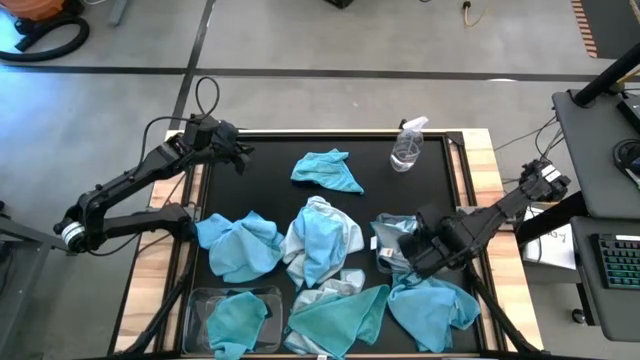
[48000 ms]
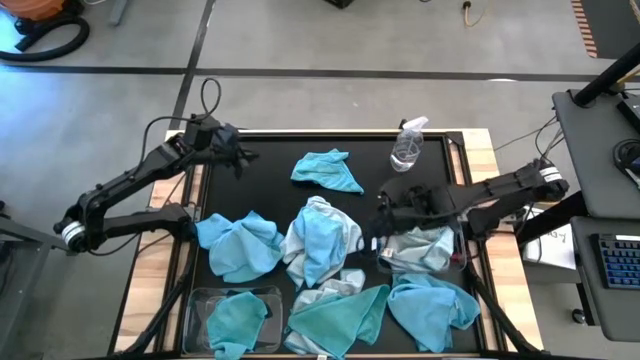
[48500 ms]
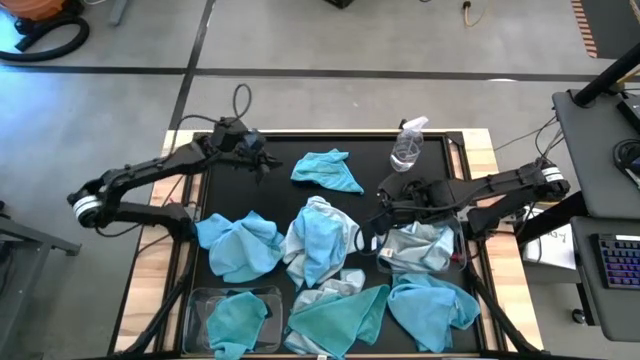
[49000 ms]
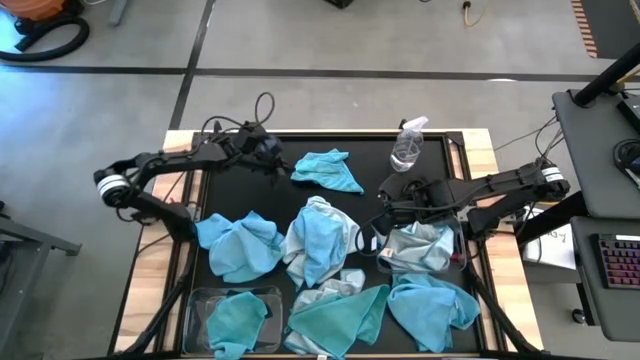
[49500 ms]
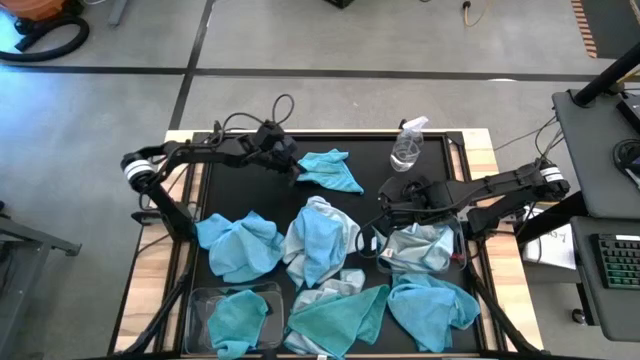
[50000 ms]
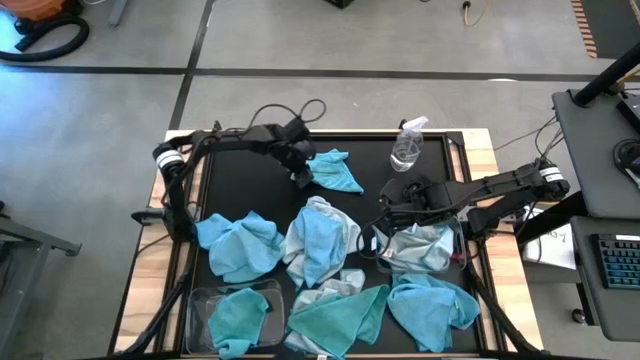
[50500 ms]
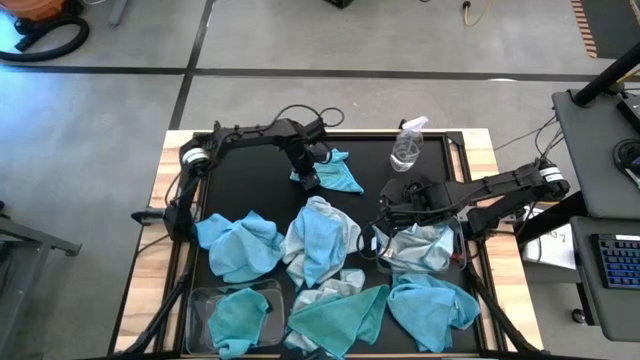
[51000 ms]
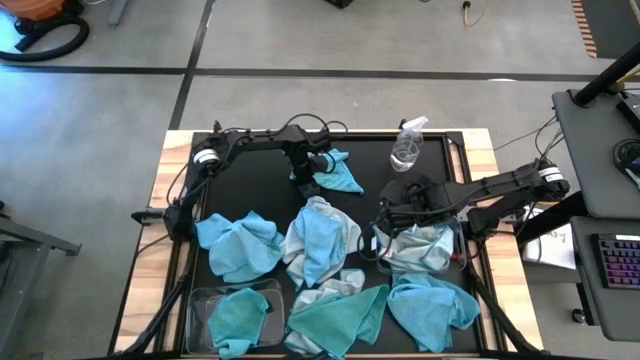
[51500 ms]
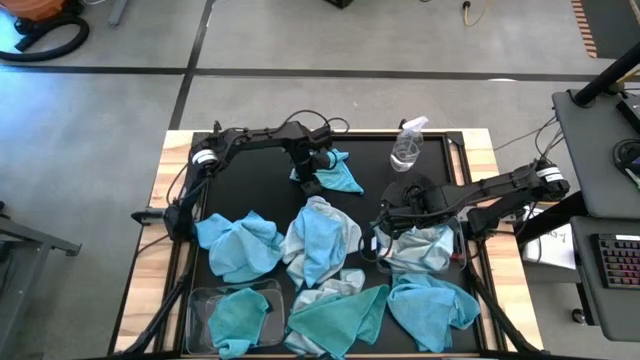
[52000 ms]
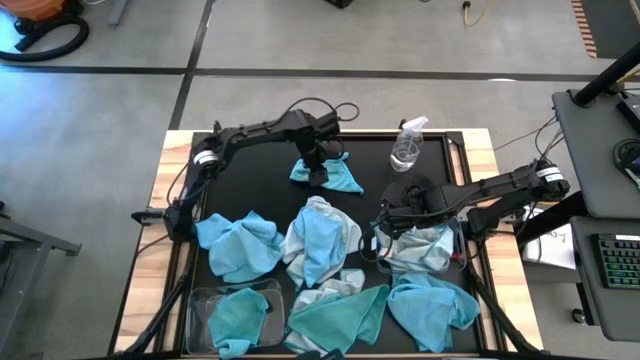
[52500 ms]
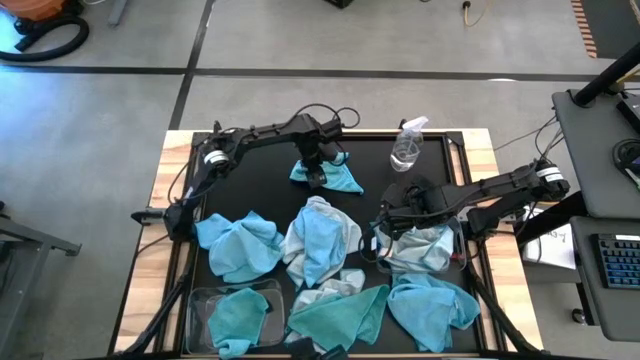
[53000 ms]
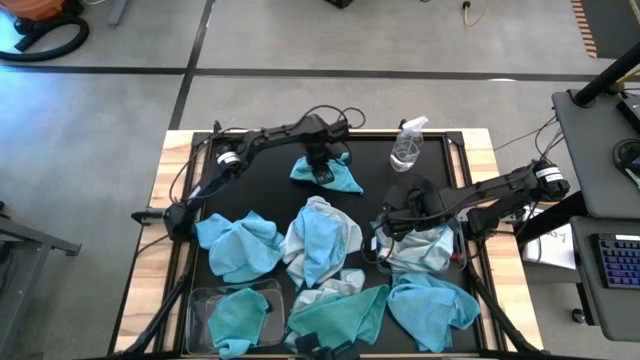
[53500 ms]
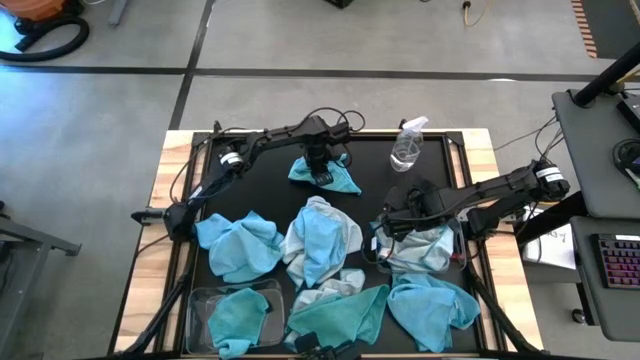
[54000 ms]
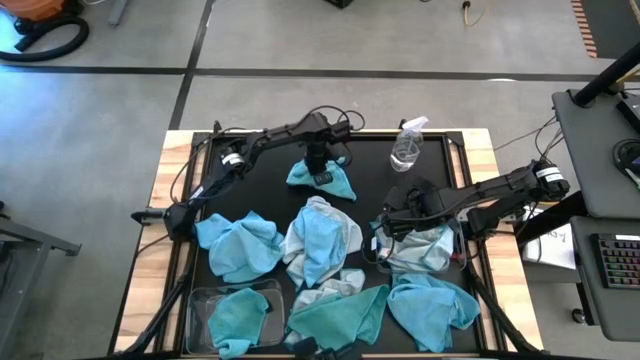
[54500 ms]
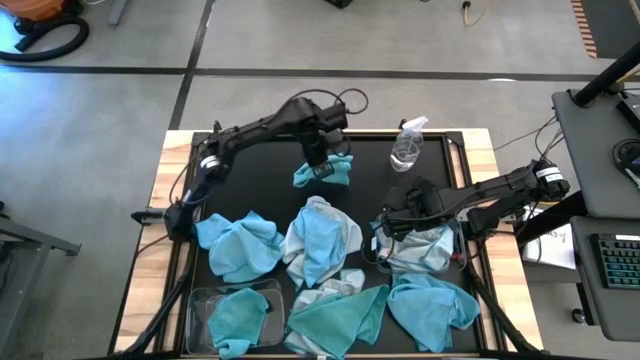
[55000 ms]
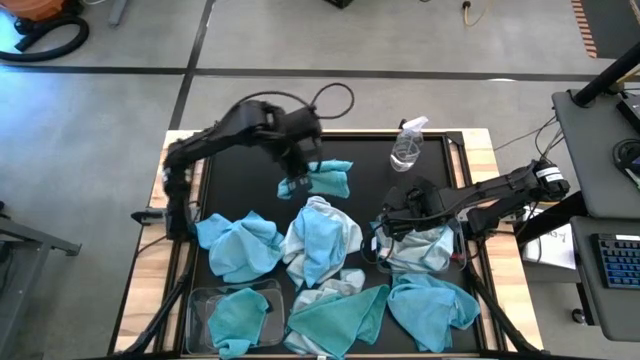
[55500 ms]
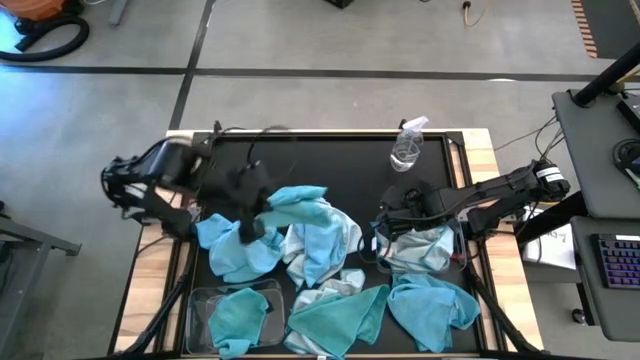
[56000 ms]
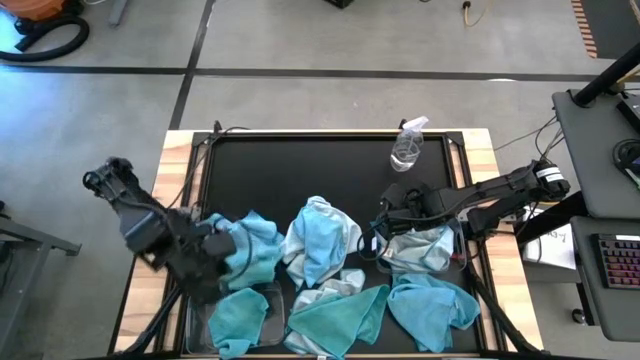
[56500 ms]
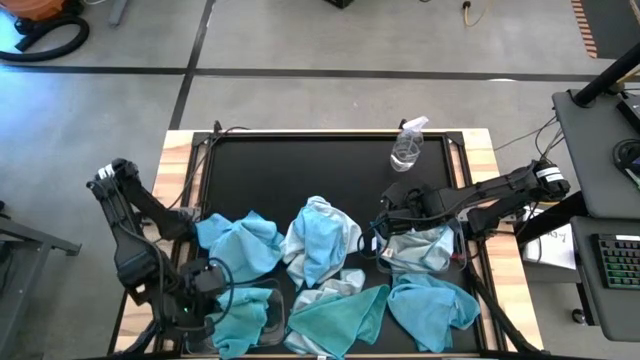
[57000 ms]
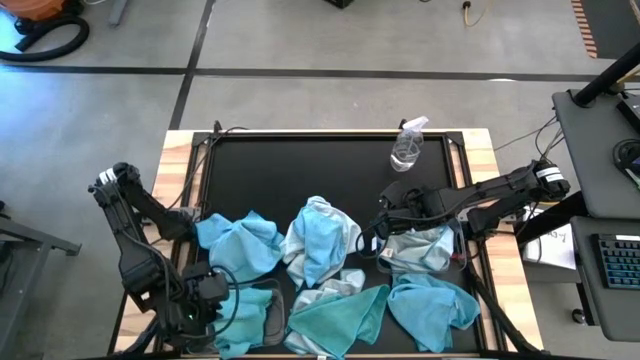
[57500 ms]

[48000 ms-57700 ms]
Task: Sort microfiber towel by color & place in baskets
Put the blue towel into the bottom transparent bin

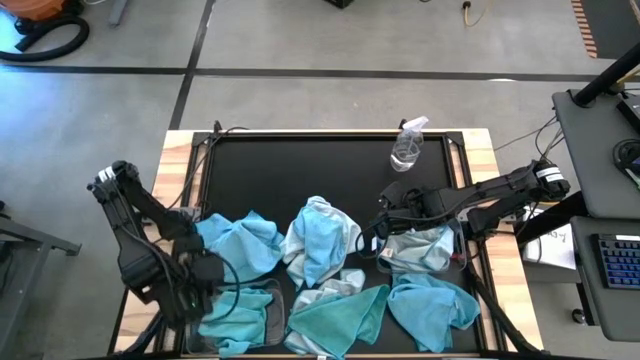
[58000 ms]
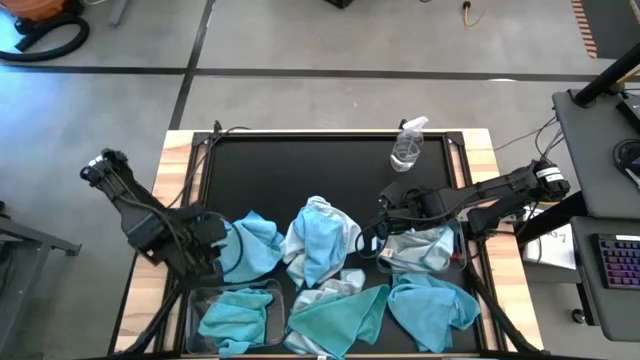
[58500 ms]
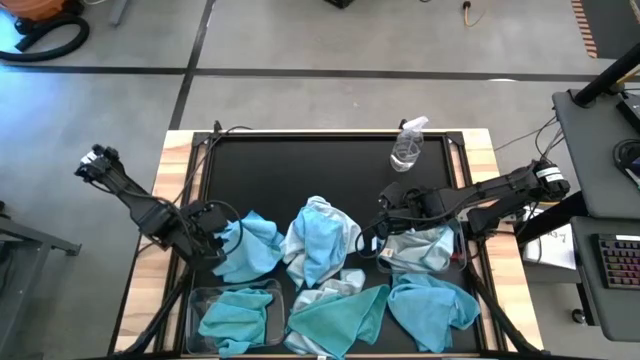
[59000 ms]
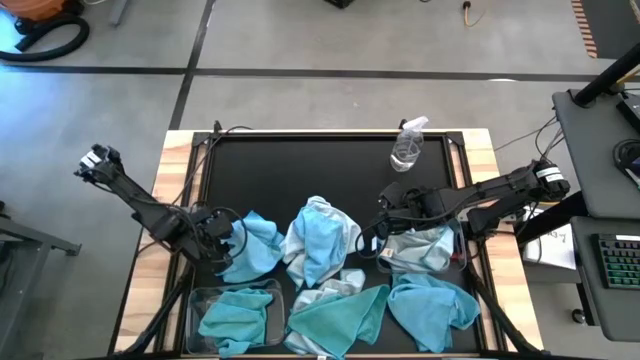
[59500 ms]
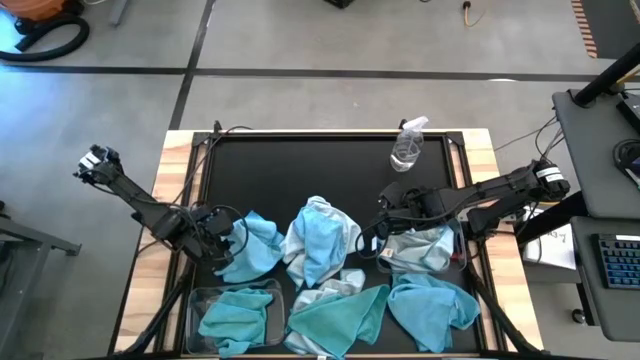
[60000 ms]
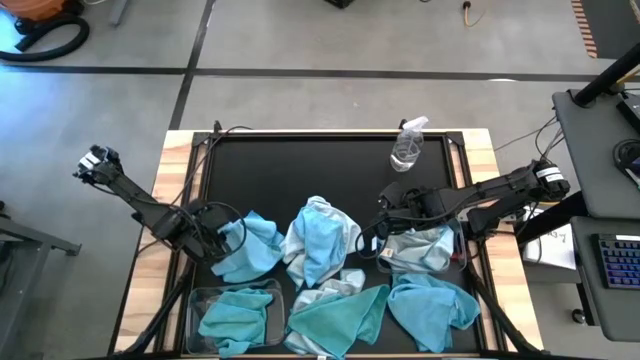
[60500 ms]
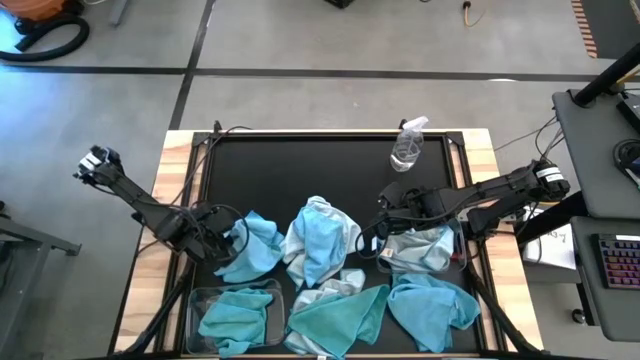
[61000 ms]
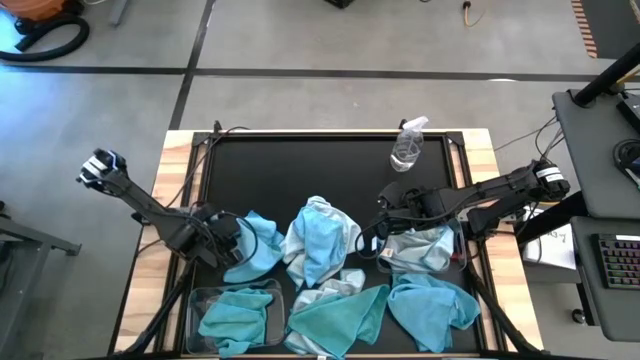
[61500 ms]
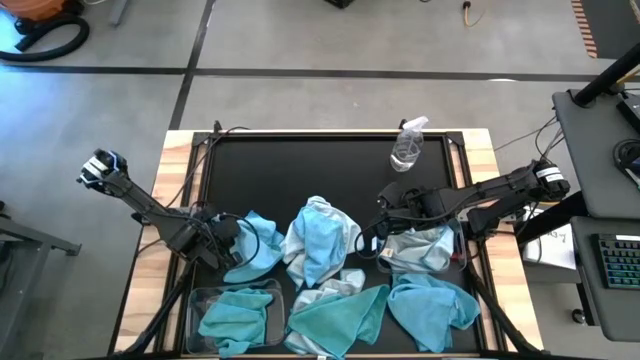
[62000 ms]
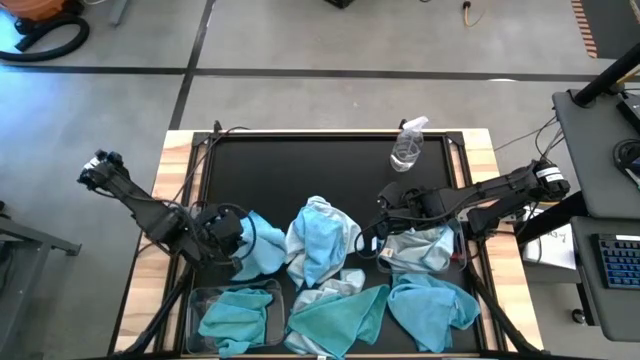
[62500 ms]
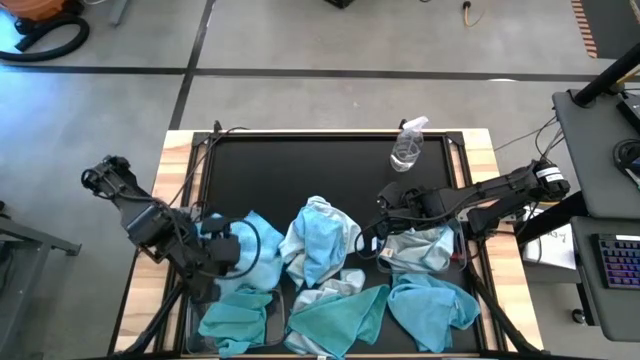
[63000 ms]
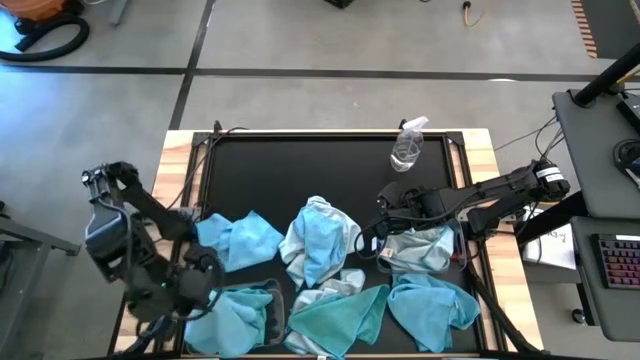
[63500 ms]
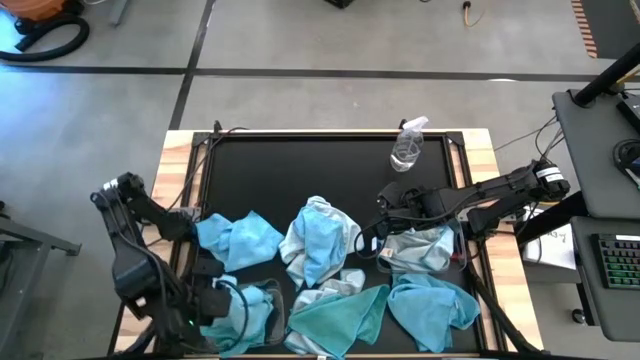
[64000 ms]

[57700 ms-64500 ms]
Put the blue towel into the bottom transparent bin

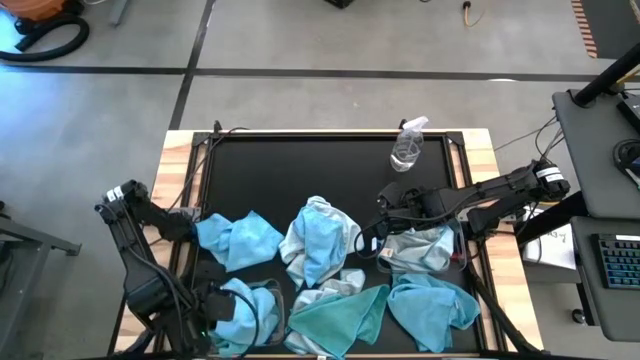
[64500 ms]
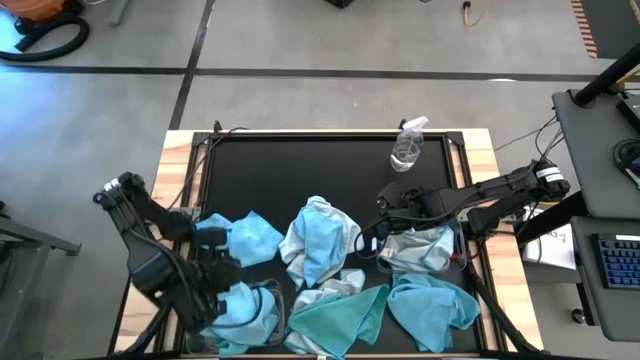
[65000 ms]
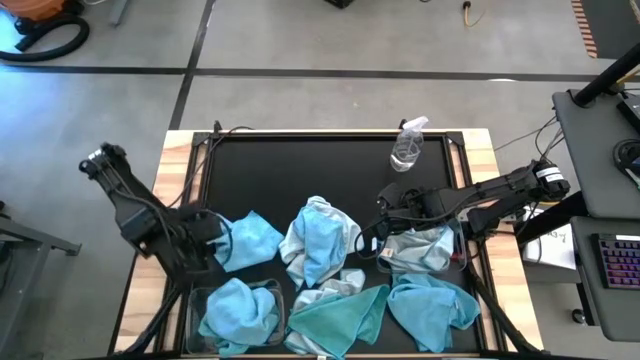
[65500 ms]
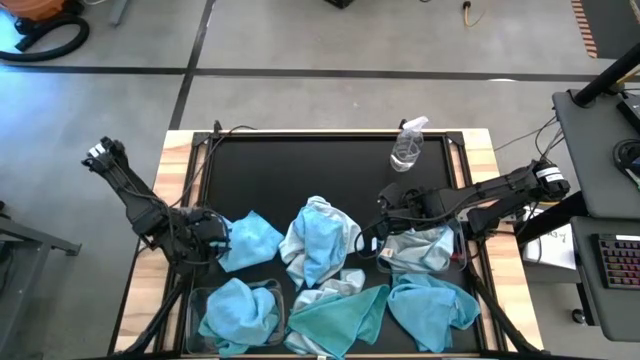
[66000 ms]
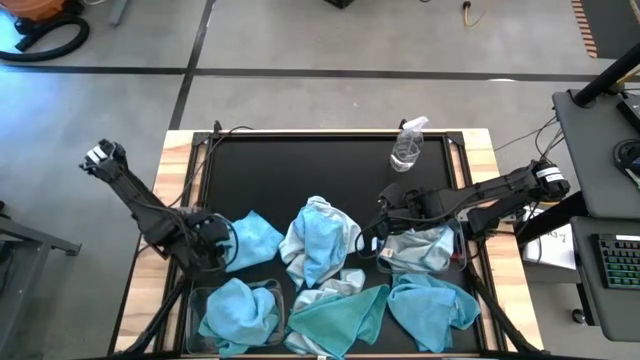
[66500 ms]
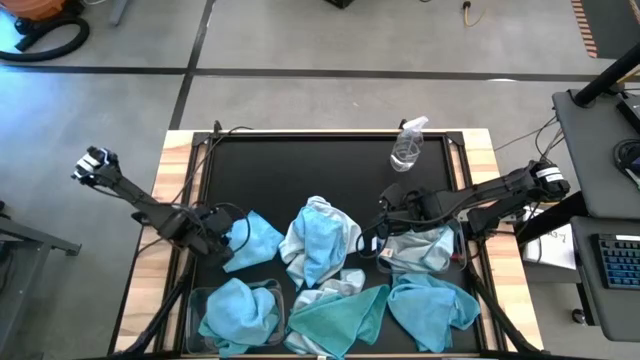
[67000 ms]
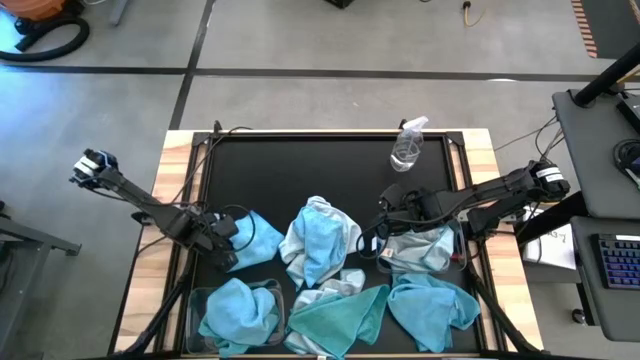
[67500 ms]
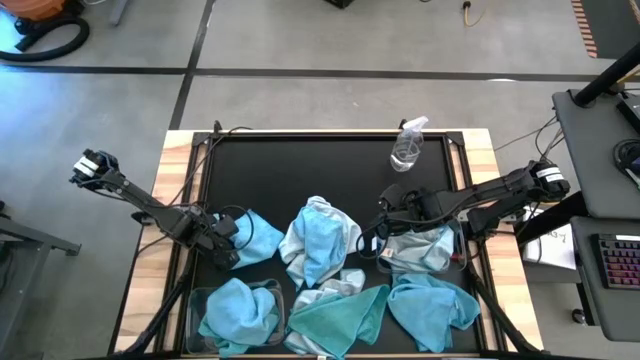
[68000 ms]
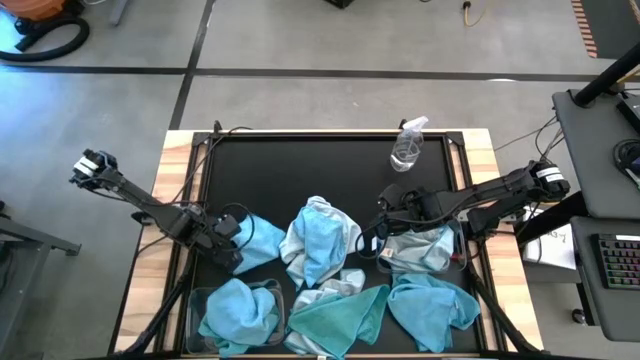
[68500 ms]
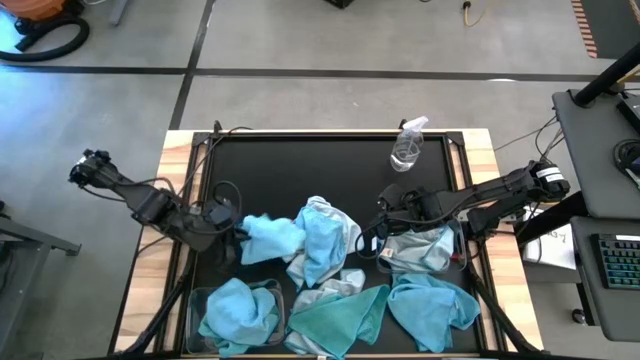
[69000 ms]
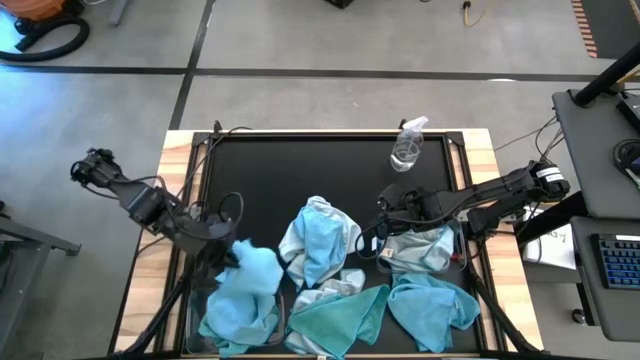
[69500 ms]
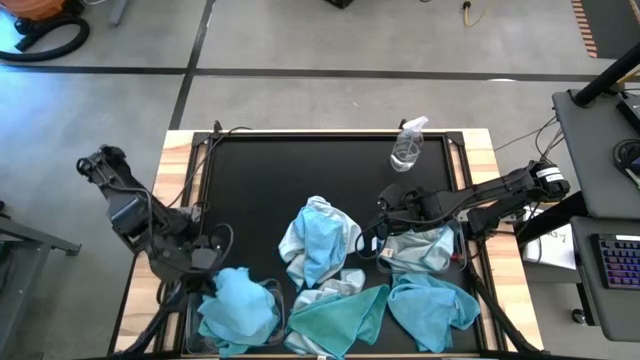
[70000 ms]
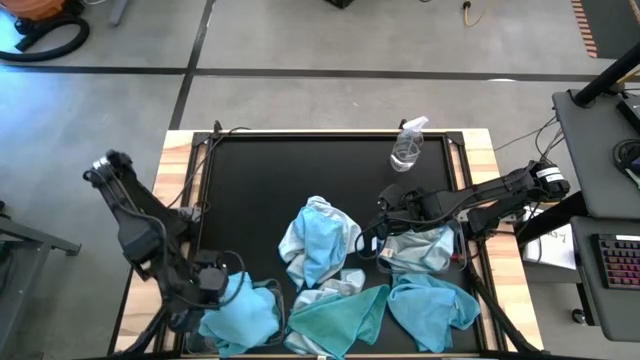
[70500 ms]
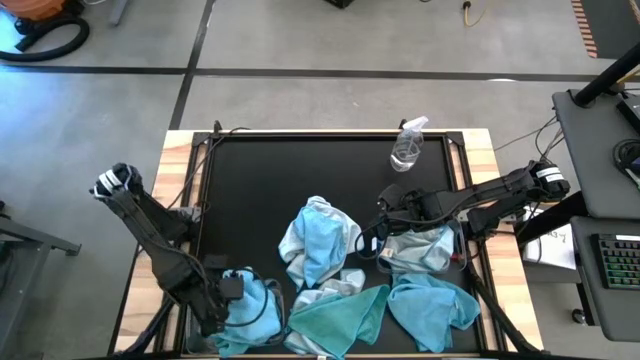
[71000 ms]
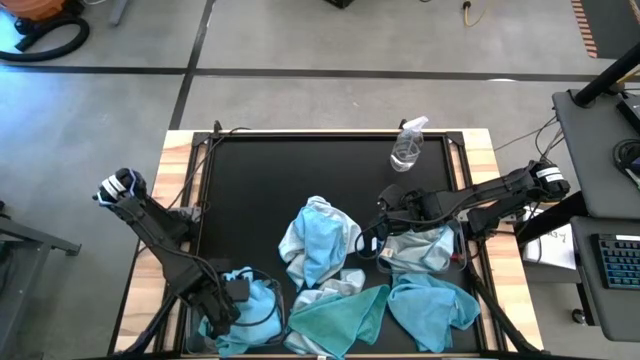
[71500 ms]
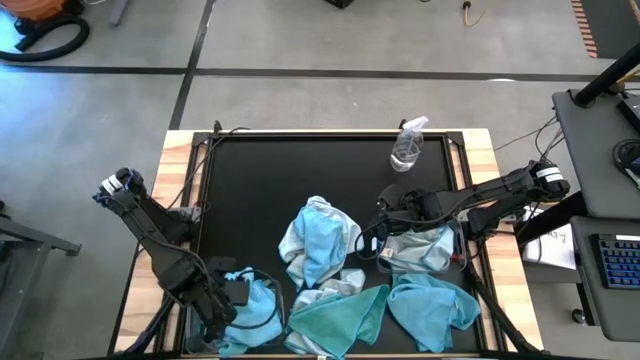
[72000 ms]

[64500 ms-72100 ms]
Put the blue towel into the bottom transparent bin
